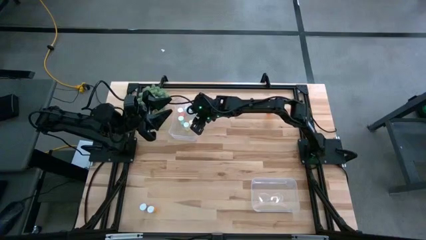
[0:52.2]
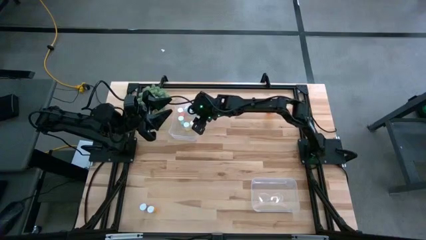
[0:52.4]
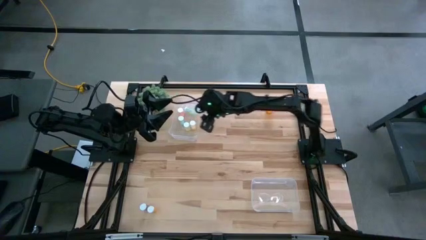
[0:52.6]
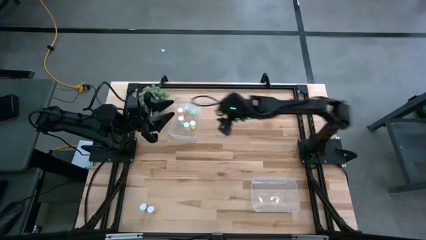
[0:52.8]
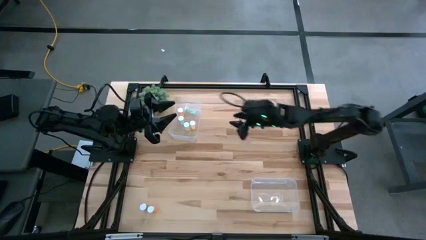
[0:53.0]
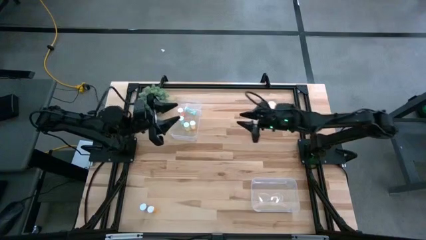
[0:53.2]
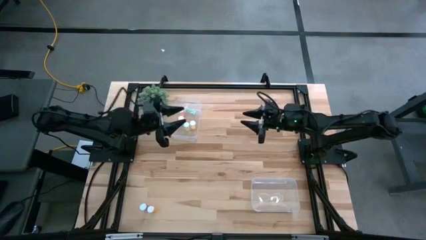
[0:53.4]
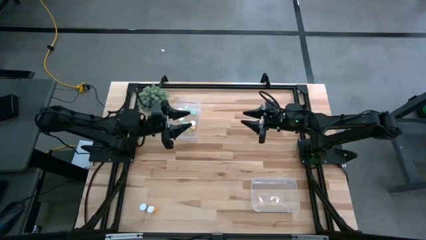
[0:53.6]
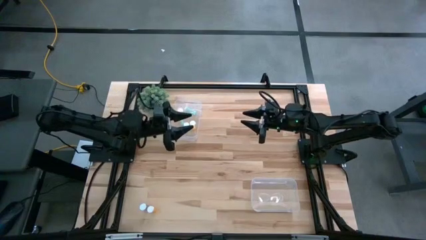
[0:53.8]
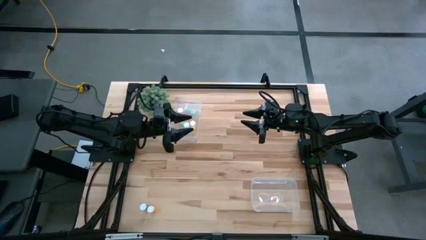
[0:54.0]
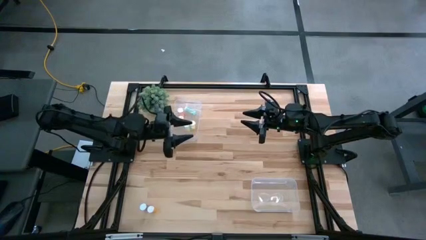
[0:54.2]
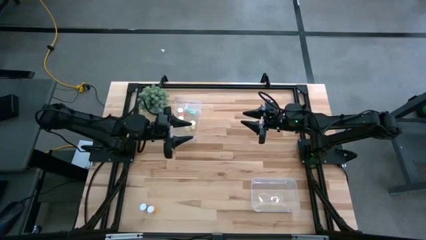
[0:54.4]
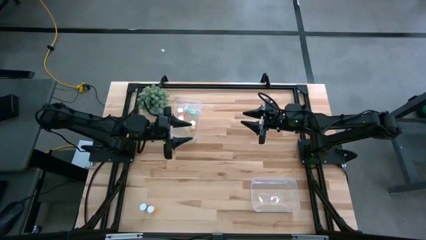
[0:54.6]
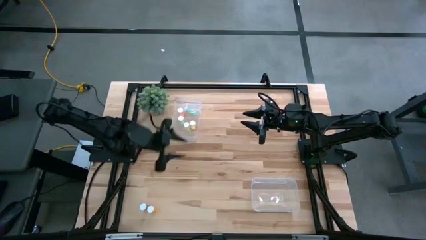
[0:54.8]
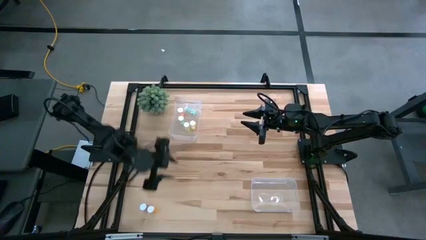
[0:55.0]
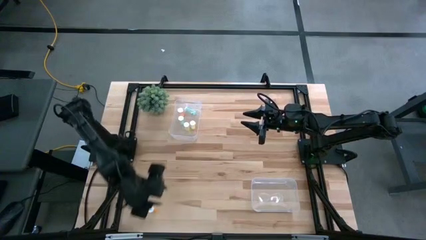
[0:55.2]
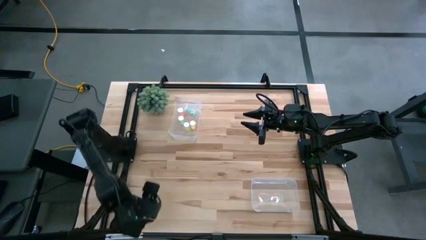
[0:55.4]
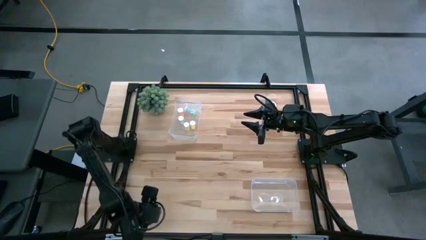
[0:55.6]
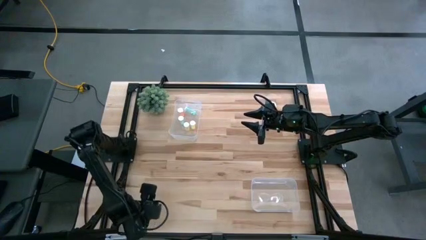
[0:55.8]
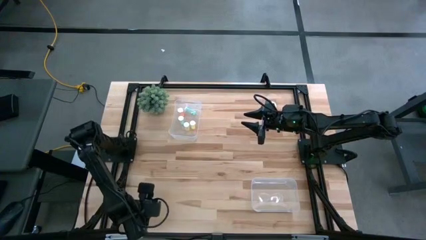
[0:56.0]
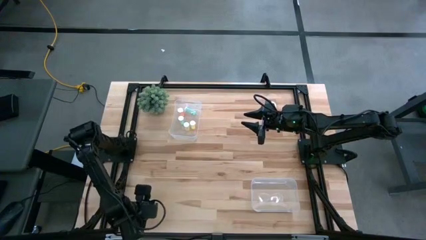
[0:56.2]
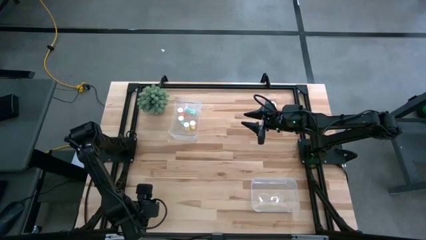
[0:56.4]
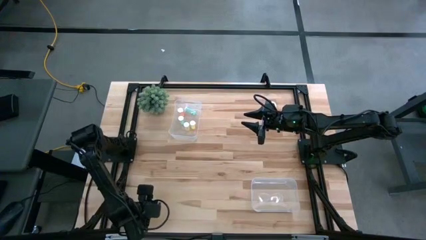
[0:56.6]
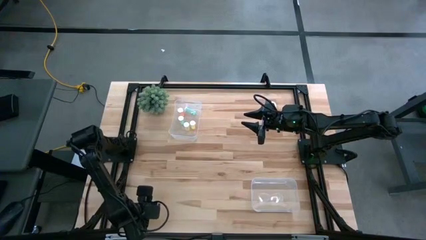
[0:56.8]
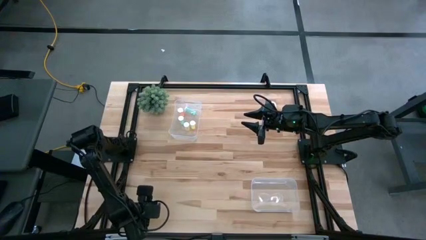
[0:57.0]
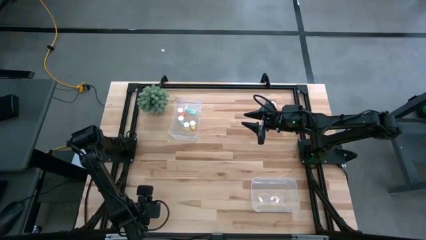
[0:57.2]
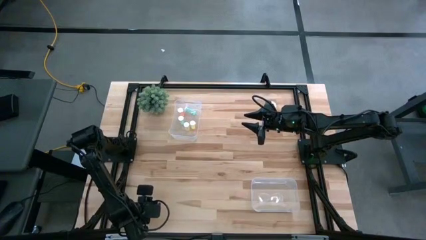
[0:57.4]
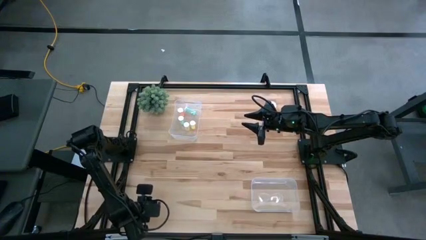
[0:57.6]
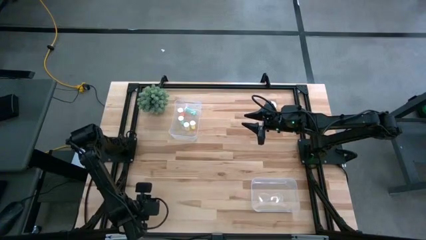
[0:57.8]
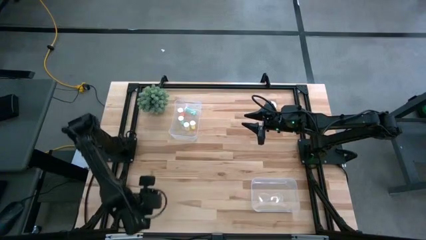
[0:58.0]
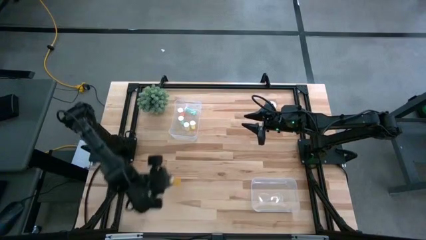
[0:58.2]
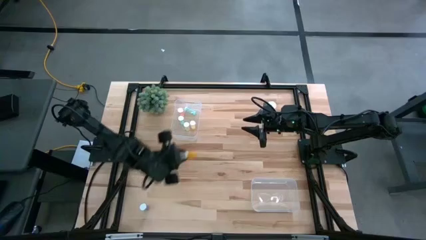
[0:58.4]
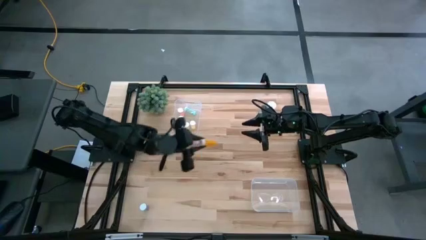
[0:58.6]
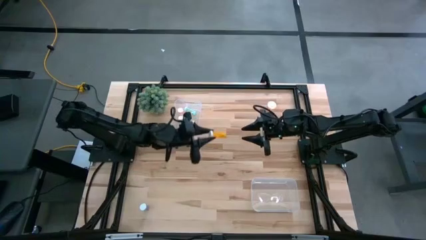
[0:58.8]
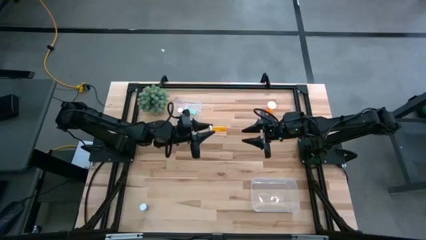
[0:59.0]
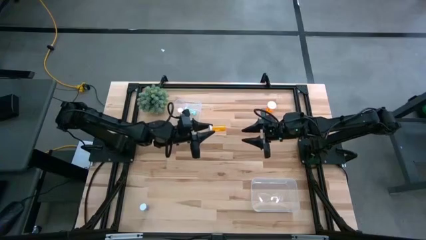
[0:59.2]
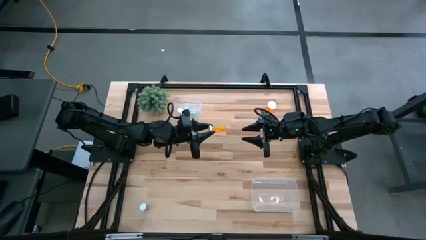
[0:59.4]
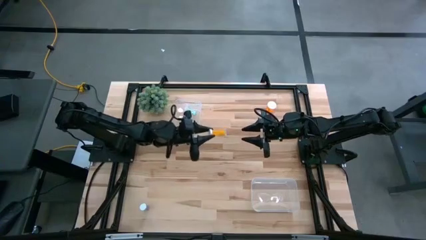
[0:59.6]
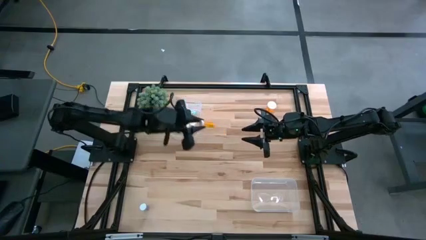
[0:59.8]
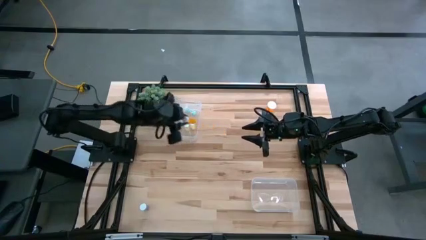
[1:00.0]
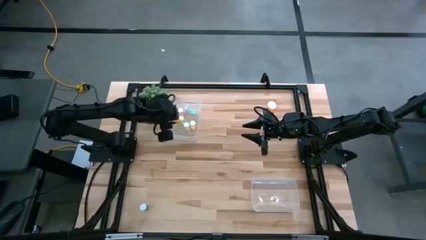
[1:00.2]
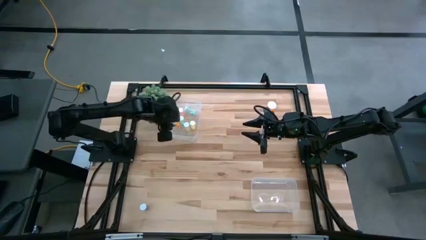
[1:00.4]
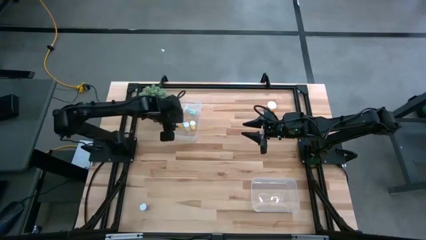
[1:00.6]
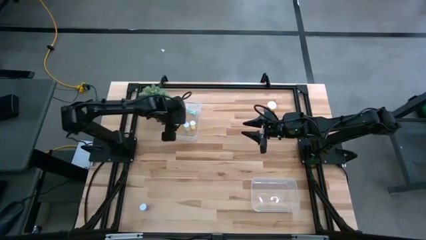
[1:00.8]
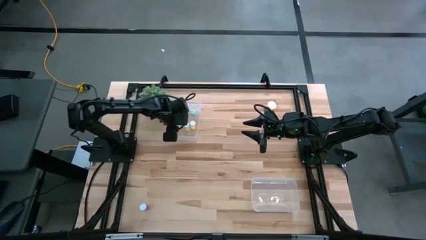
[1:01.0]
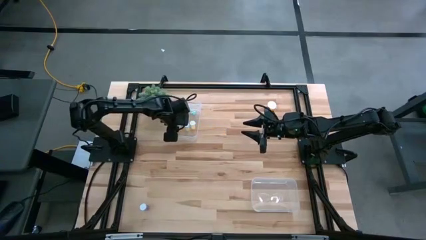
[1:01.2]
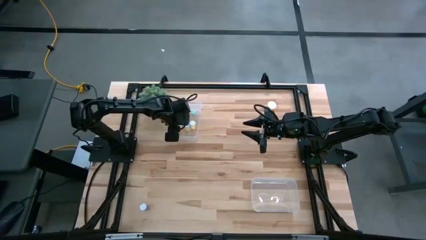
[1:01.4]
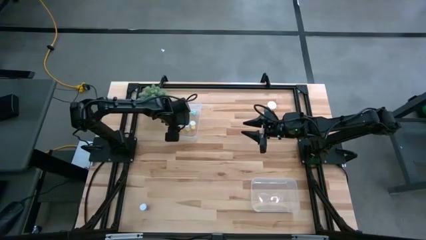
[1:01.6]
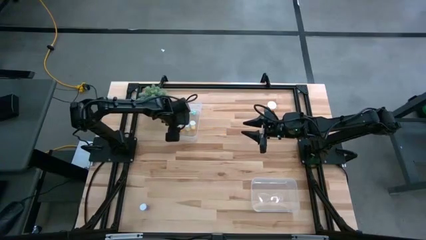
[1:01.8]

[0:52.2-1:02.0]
Task: Pick and place medicine bottles into bin by pill shape (circle, oval)
Put the small orange tablet bottle into the top transparent bin

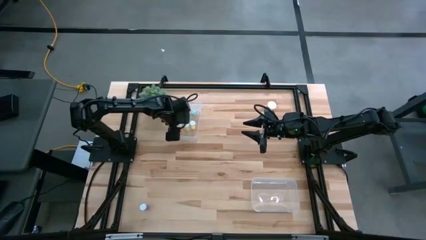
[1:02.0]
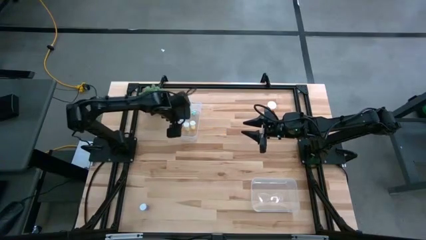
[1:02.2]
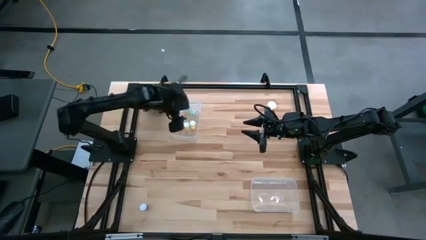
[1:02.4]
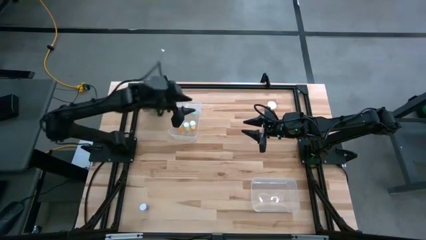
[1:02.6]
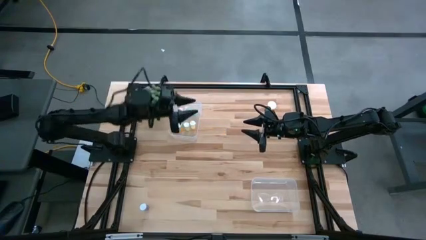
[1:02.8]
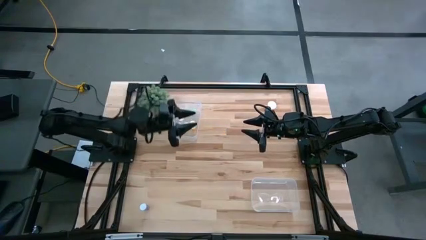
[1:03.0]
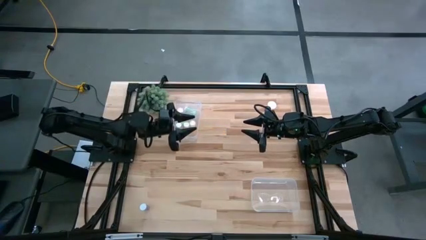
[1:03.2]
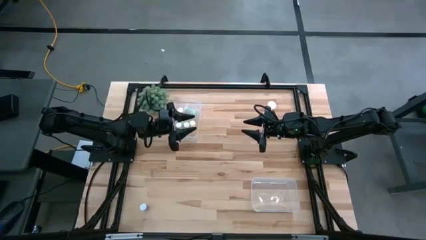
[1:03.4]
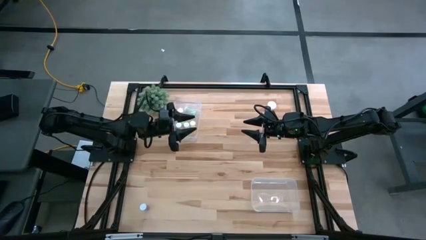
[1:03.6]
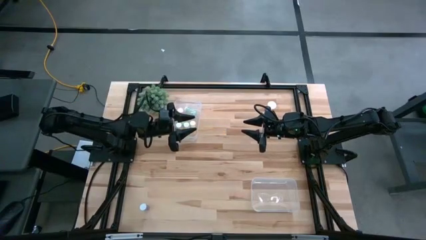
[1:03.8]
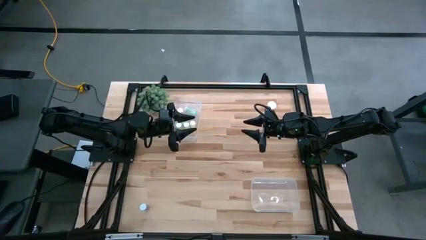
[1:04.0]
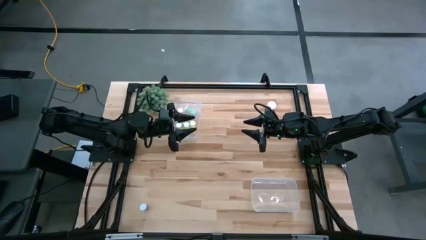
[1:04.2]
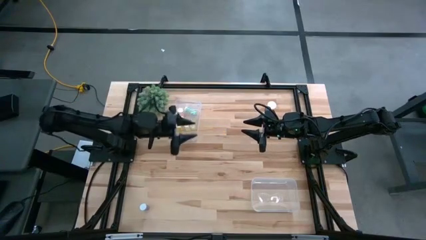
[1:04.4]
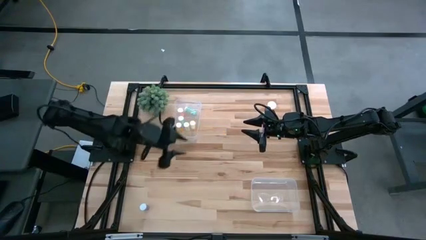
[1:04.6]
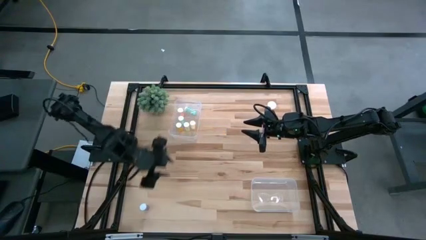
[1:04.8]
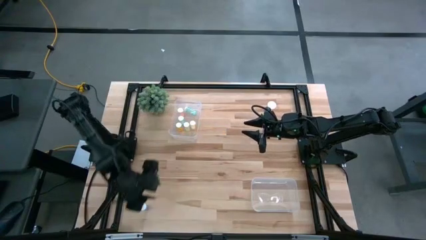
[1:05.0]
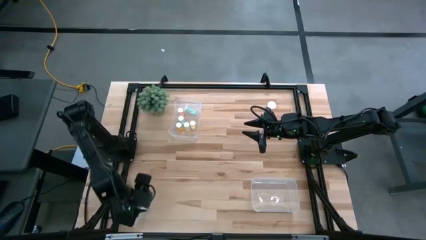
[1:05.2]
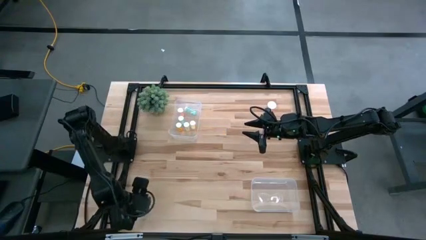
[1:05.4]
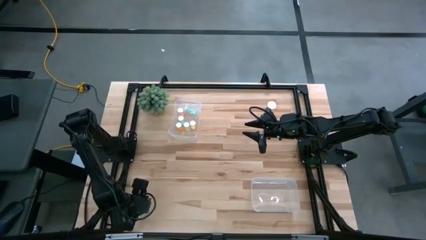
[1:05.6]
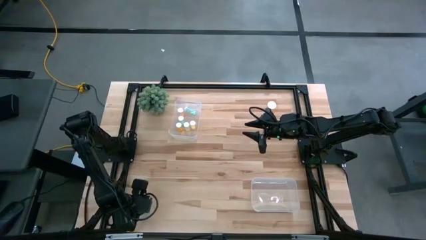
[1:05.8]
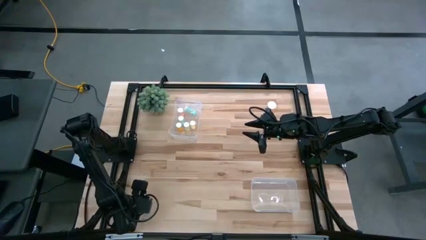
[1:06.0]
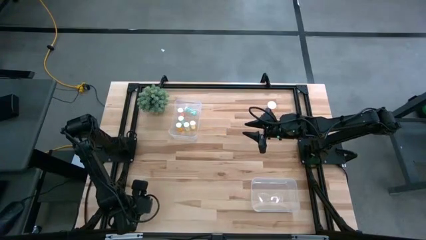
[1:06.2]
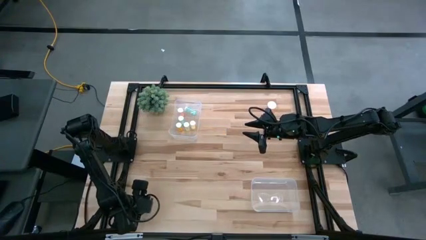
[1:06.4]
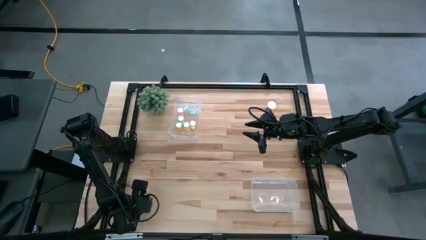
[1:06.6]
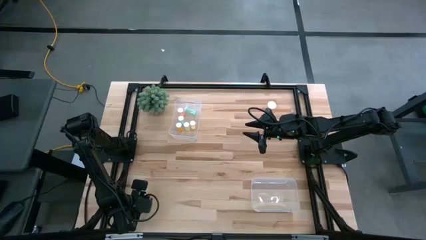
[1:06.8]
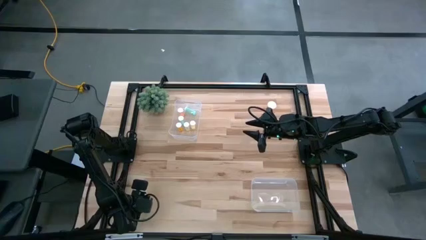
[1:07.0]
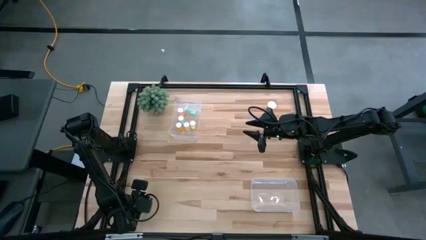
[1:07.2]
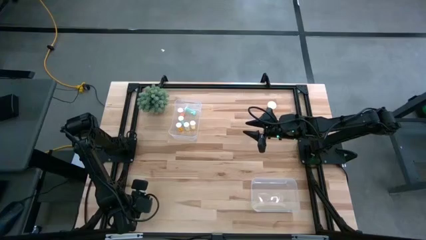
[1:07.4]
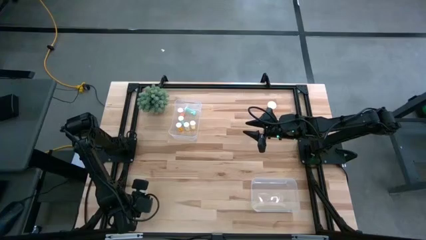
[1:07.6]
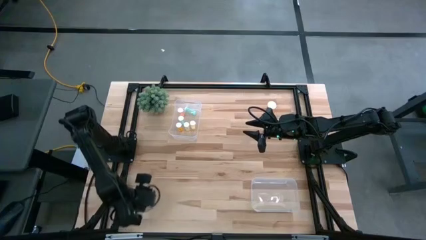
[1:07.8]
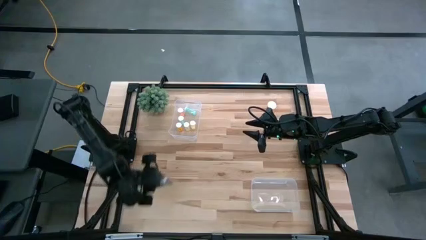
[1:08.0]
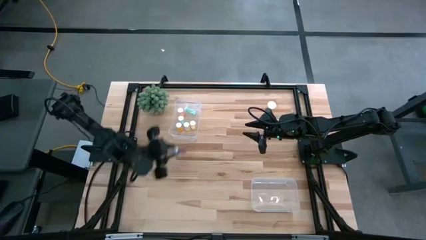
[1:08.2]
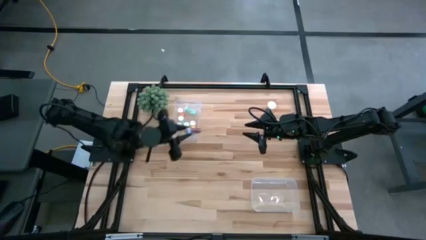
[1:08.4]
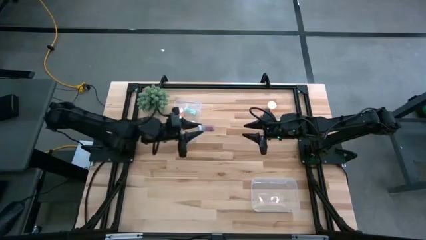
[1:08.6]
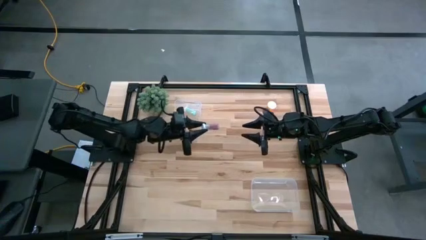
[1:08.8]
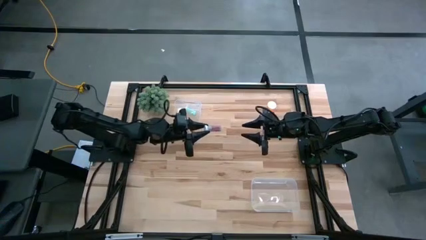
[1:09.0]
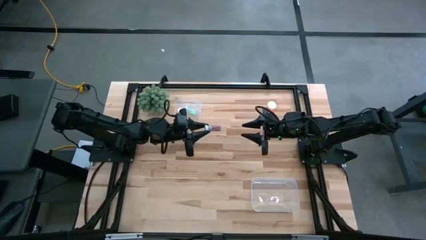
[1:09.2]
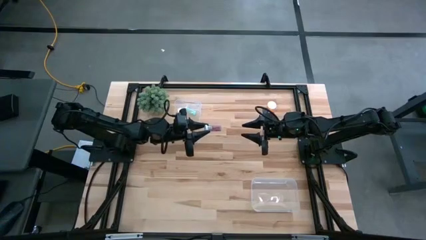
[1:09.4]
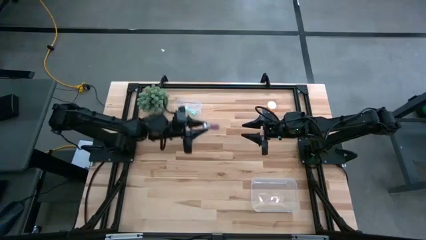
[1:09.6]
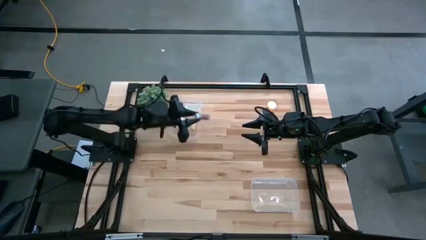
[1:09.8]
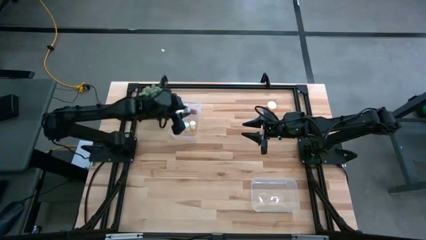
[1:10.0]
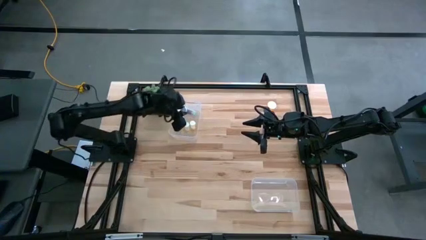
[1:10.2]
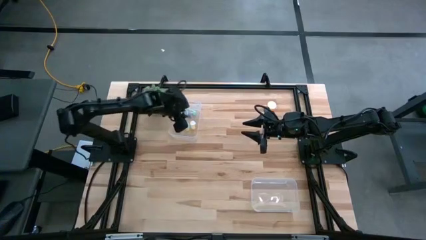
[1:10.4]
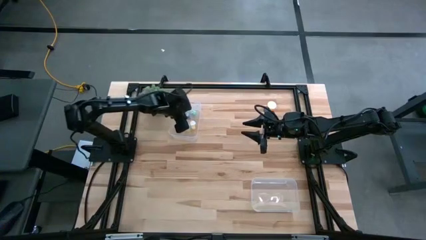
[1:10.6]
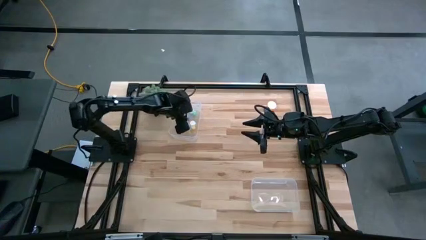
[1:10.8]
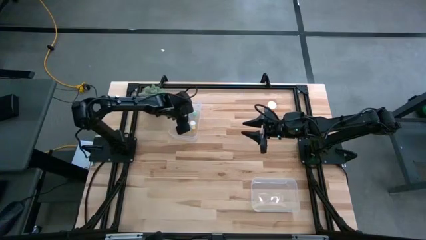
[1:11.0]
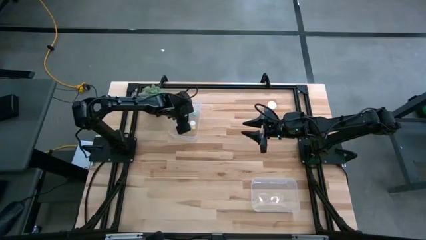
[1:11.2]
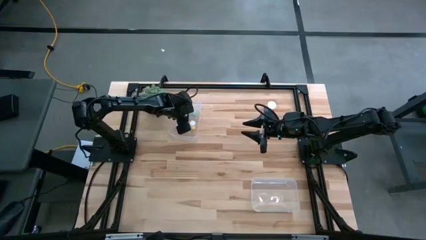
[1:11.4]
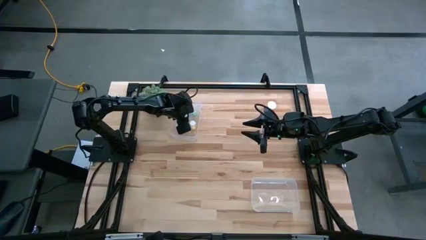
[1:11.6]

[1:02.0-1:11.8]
Put the blue capsule bottle into the bottom transparent bin
